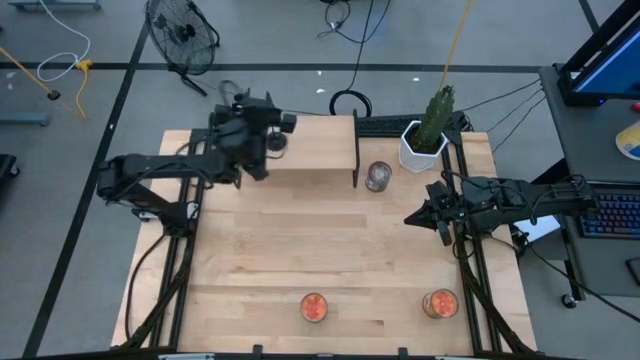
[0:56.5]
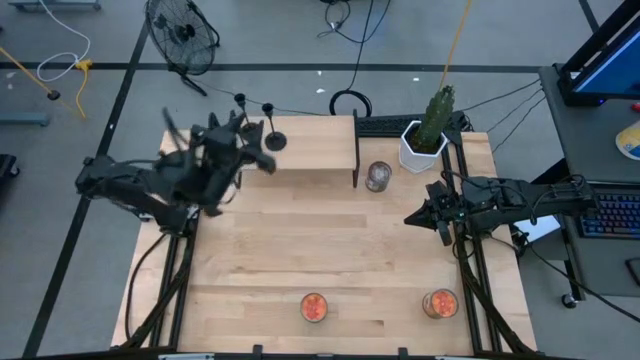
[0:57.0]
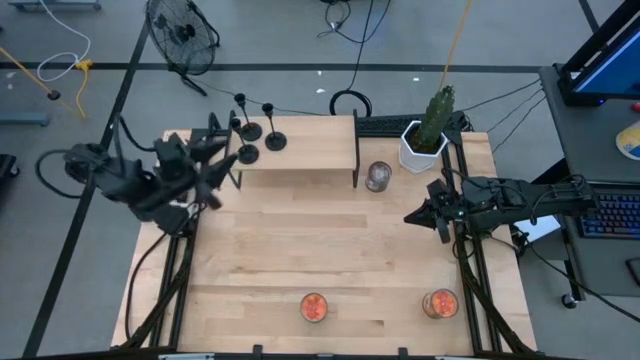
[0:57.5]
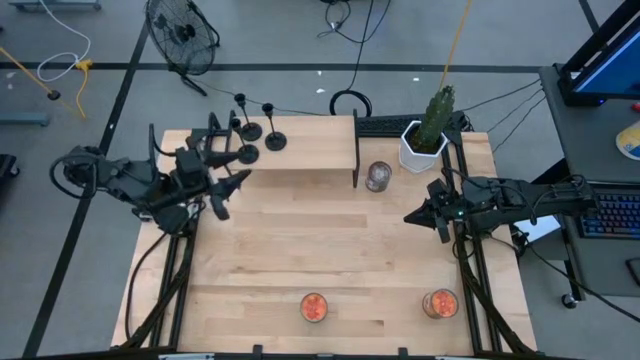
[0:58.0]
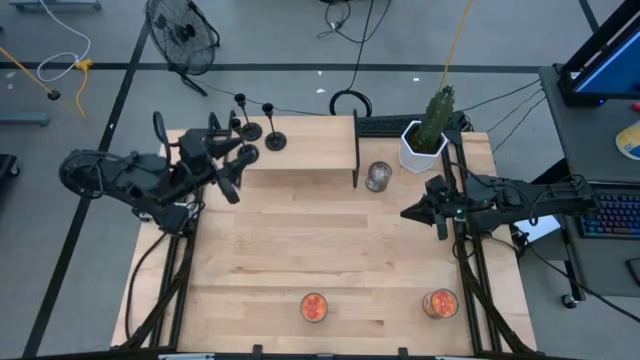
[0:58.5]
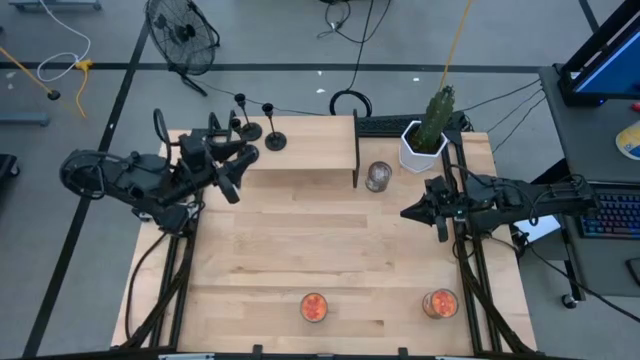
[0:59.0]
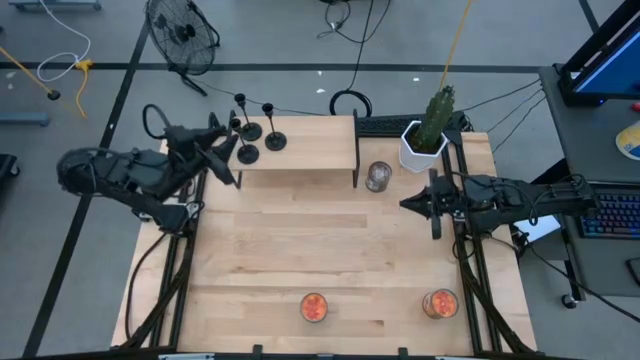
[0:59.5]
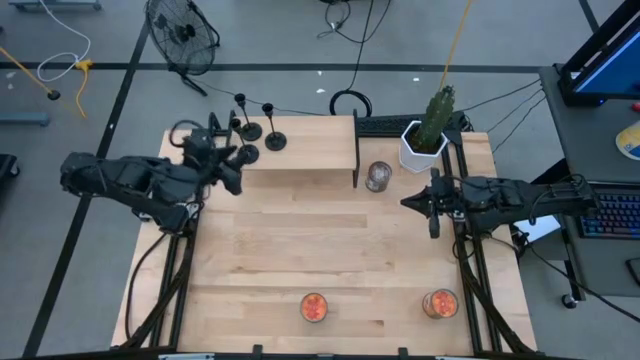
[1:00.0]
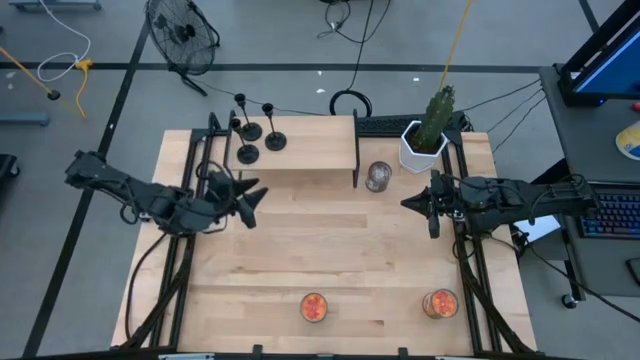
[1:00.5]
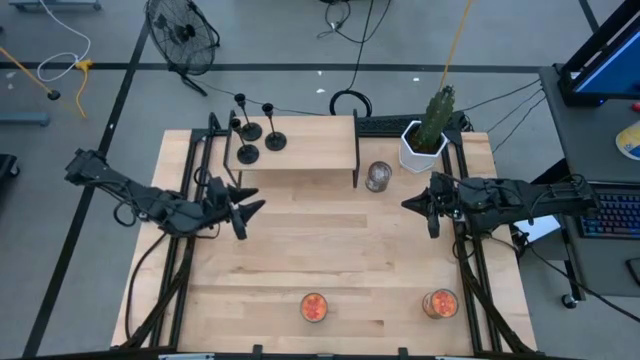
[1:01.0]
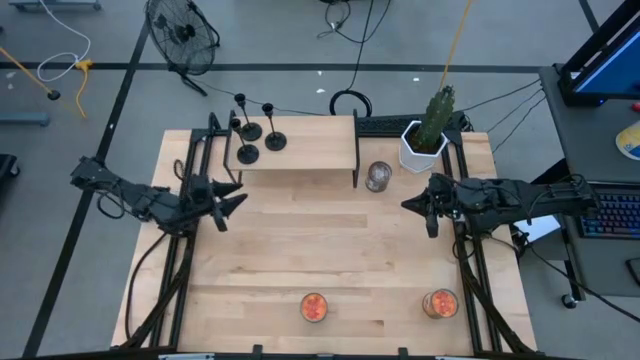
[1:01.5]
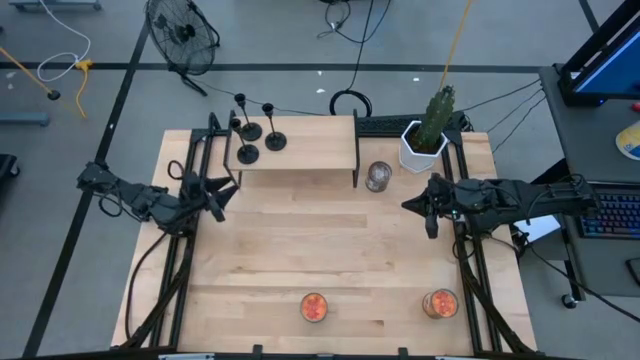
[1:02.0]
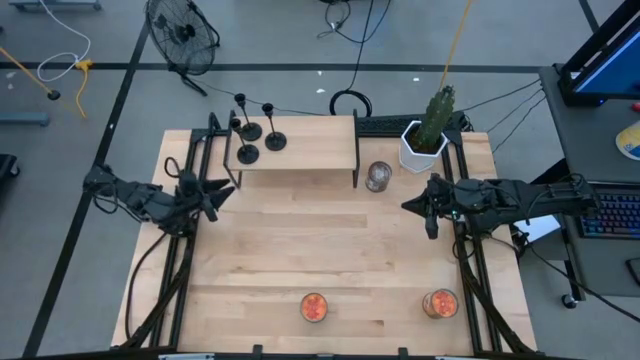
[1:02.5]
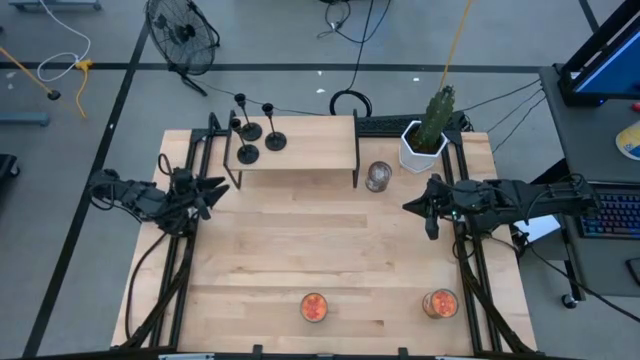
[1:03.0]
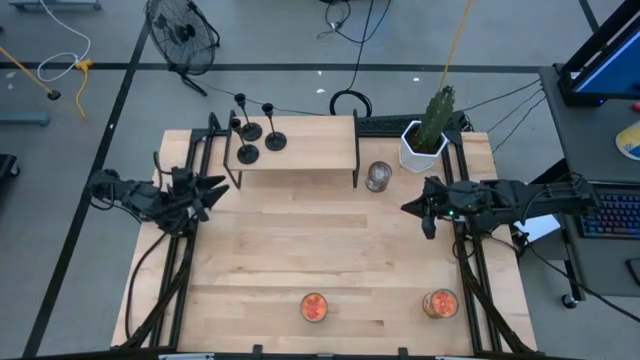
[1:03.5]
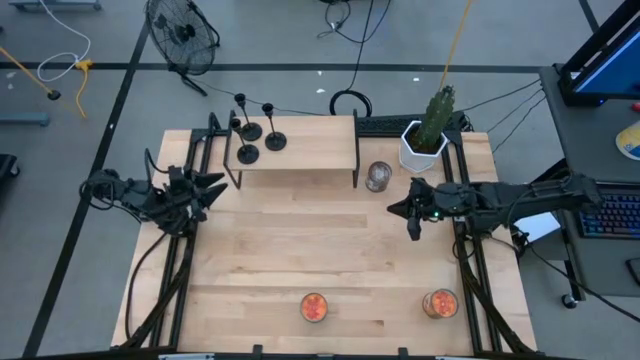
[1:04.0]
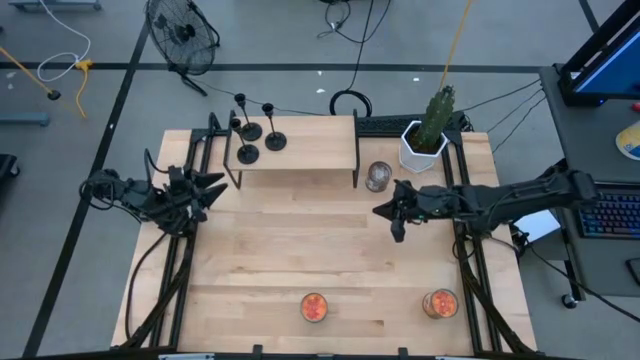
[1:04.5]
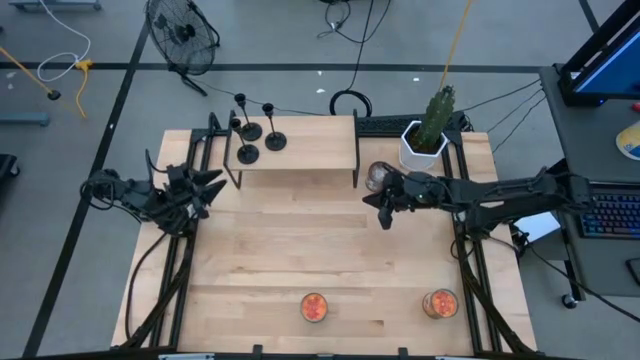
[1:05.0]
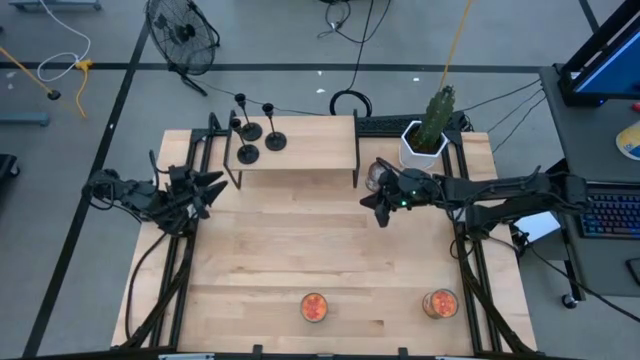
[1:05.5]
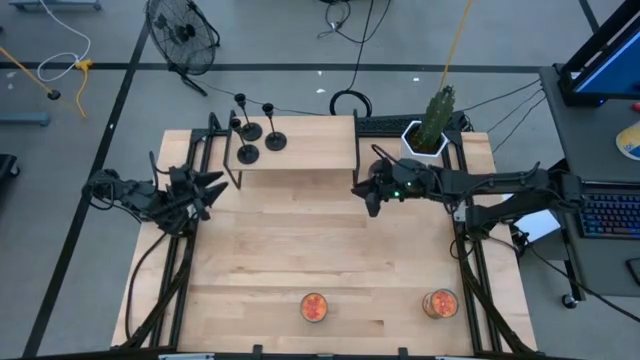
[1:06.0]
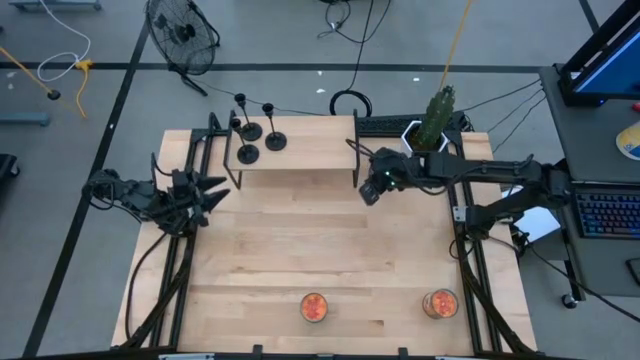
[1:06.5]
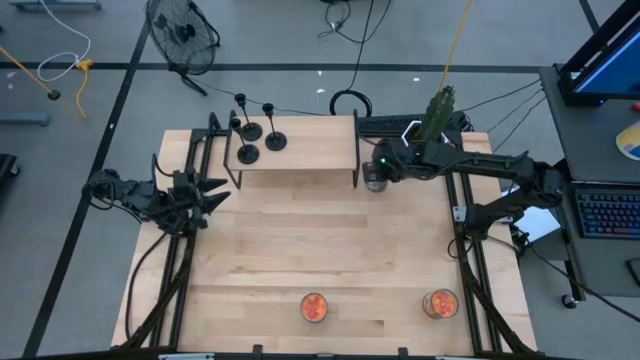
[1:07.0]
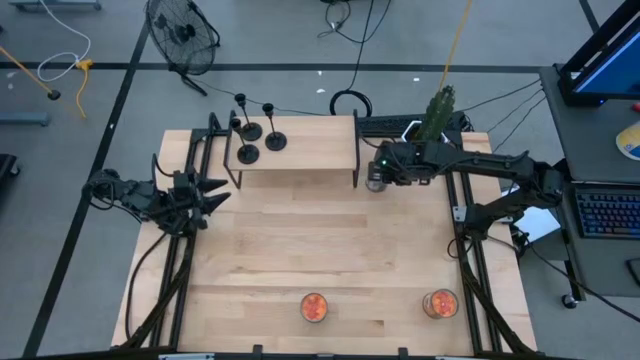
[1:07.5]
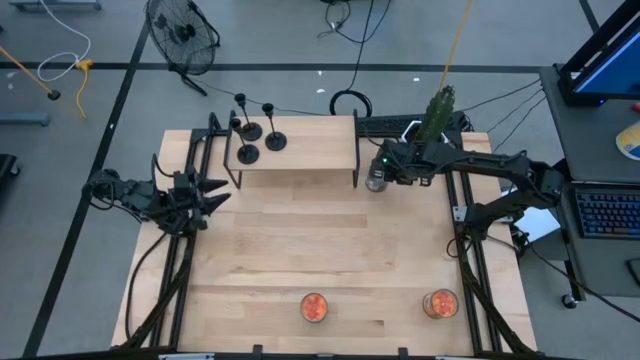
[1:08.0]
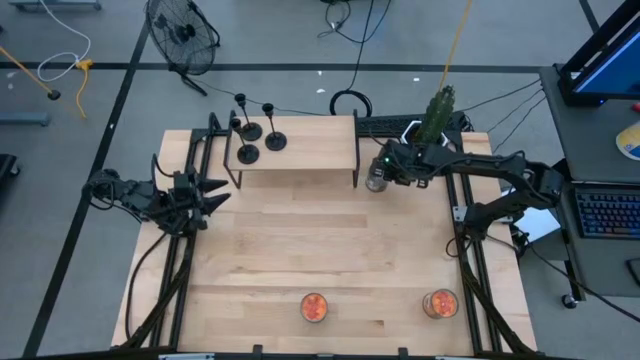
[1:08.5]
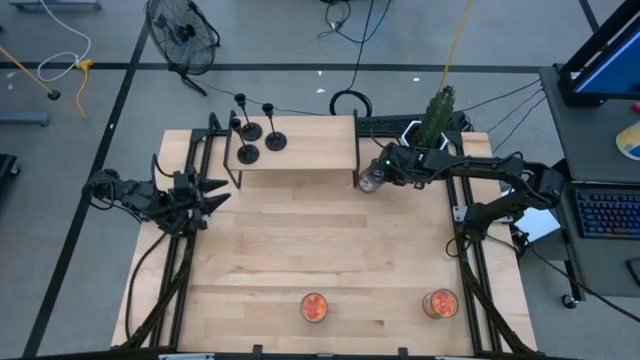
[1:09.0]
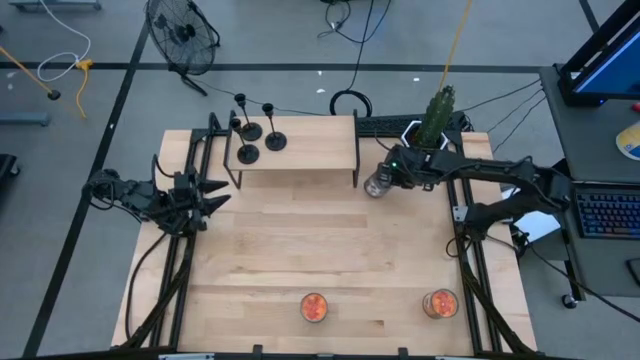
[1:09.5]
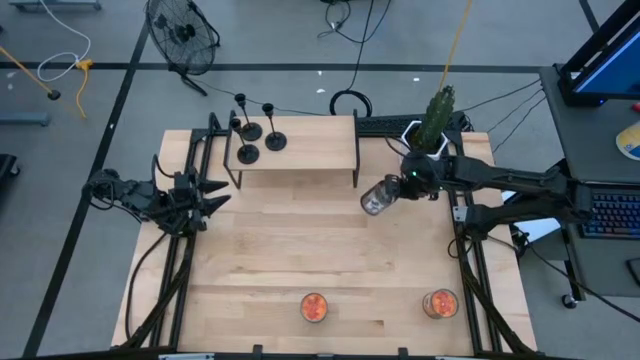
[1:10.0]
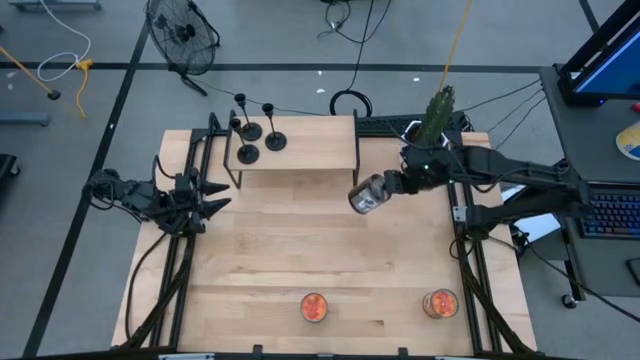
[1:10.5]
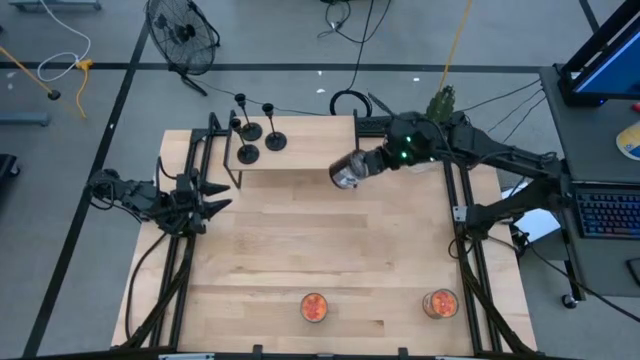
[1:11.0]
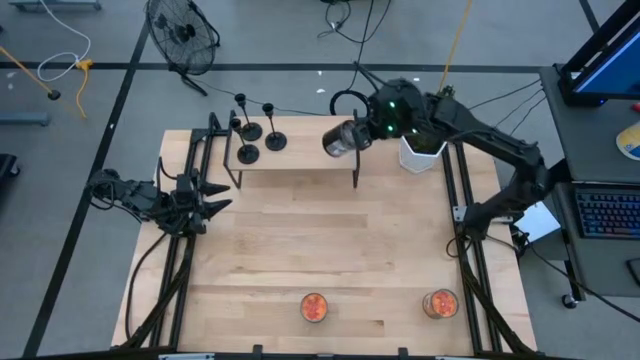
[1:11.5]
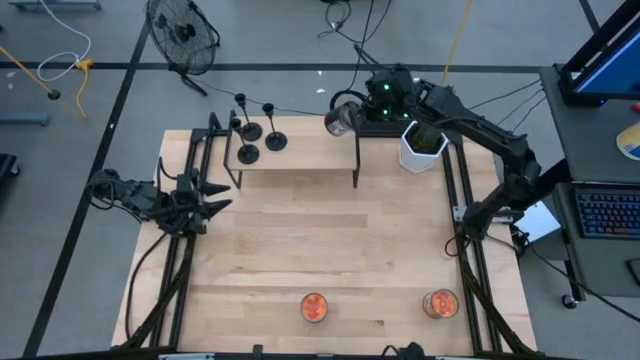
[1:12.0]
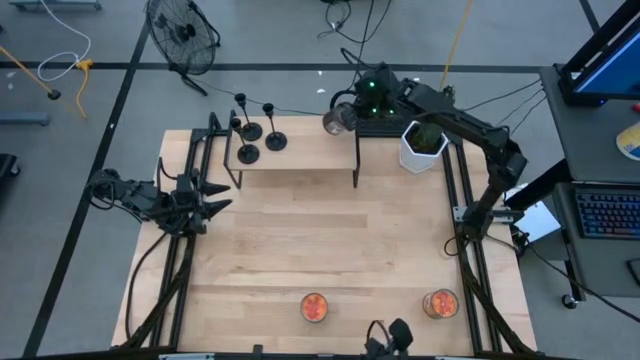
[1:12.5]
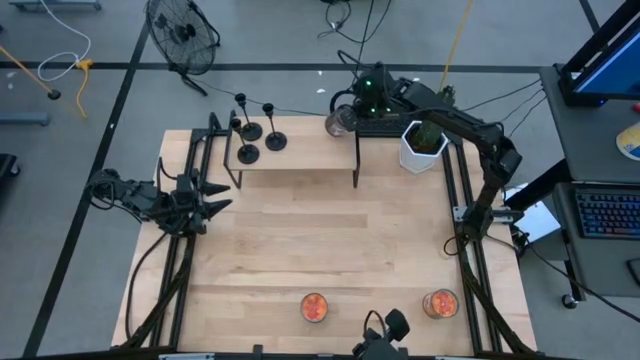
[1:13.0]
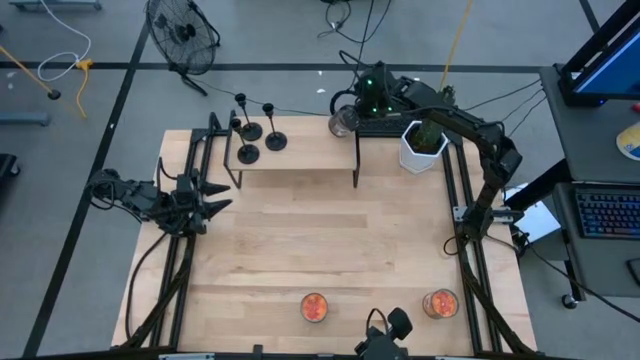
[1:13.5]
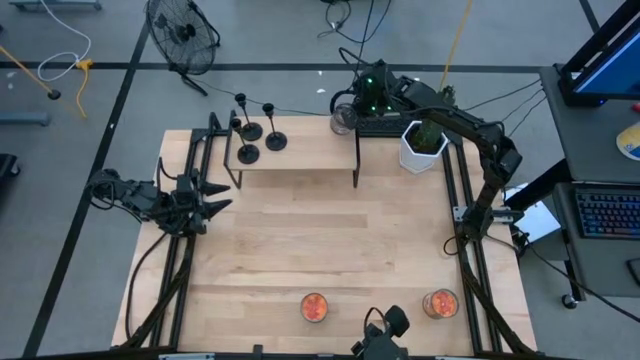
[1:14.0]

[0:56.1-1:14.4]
Task: Pick & Place candle stick holders
Put the brown scented candle on the shelf

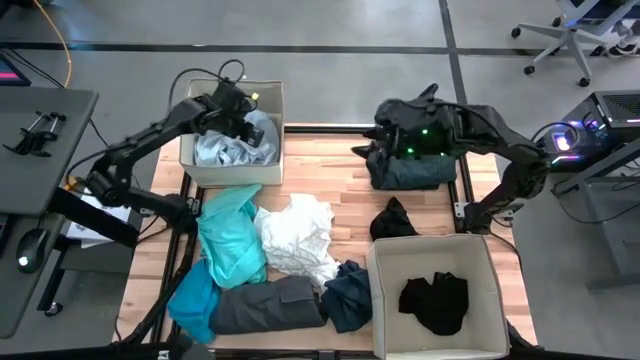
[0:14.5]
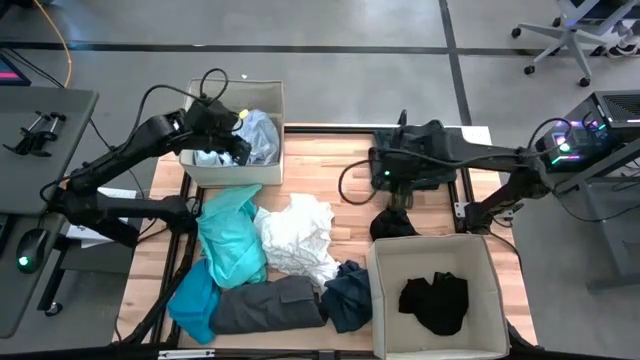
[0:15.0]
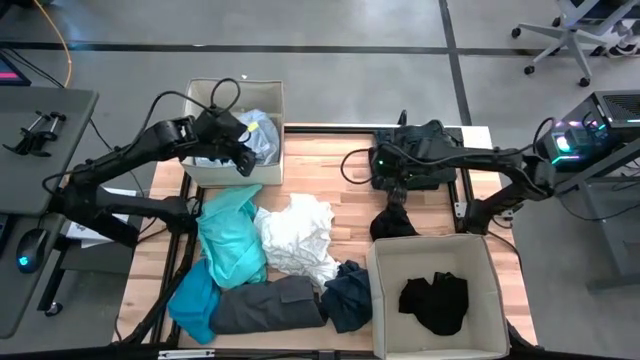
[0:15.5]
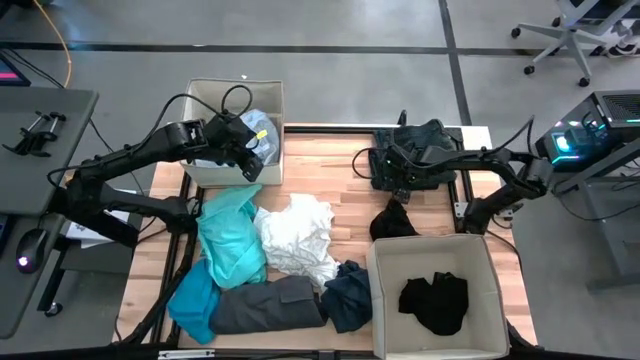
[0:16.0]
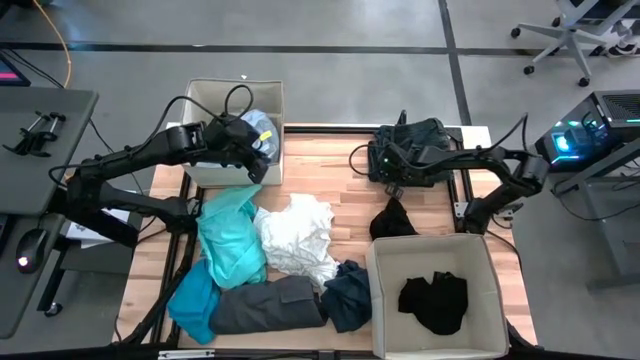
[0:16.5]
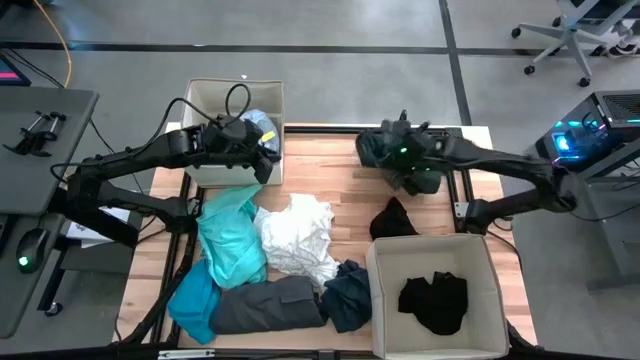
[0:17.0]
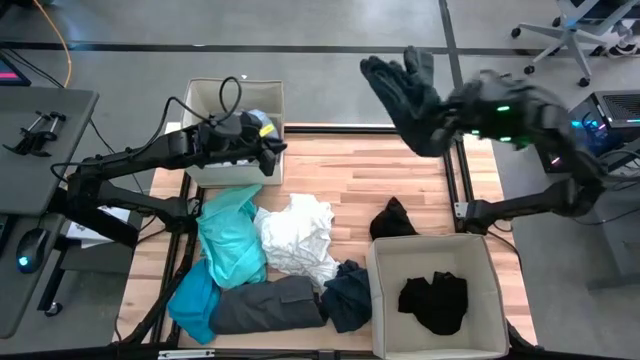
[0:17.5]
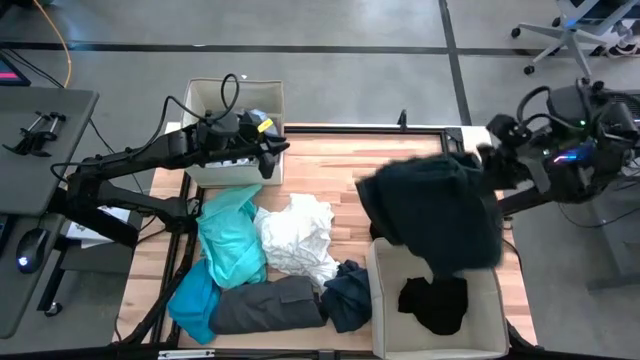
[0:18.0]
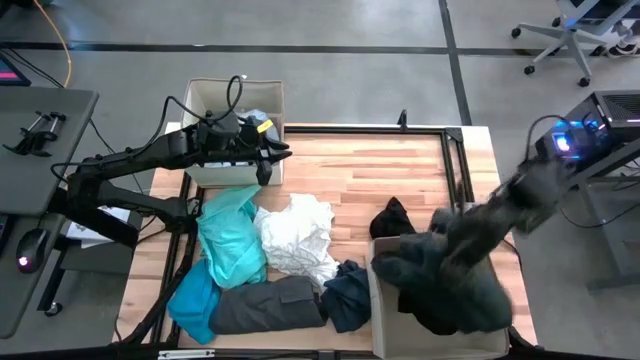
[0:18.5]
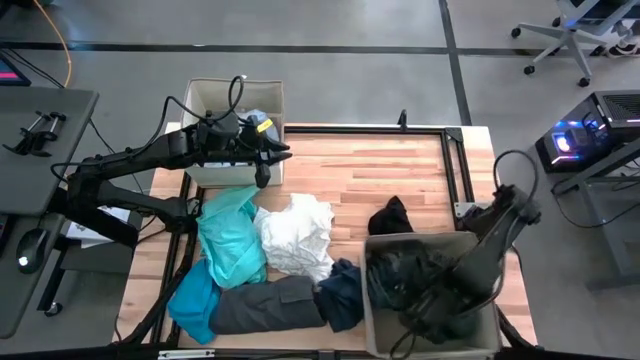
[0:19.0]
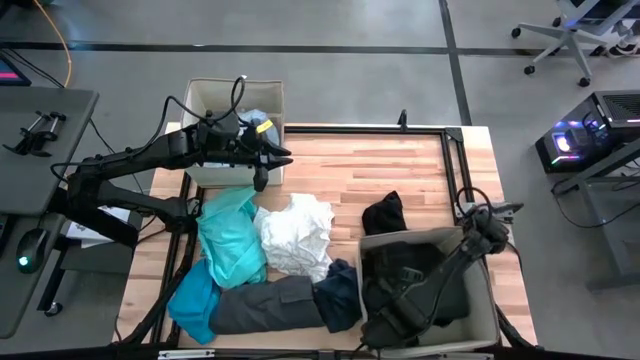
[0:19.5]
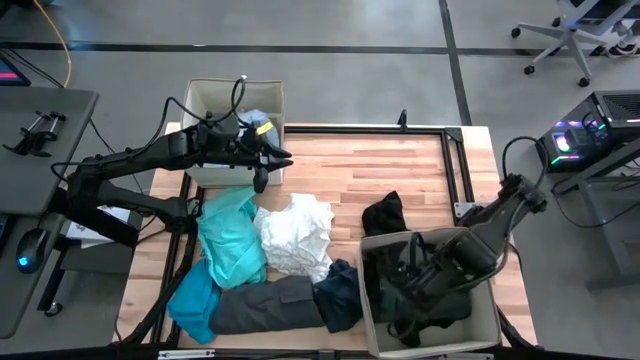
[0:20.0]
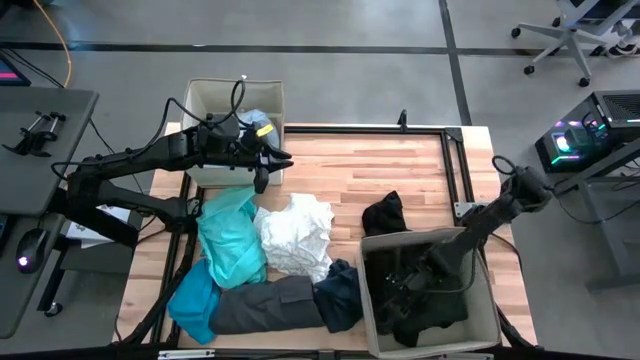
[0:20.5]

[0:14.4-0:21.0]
Task: Sort clothes
Put the blue pants into the bottom laundry organizer
